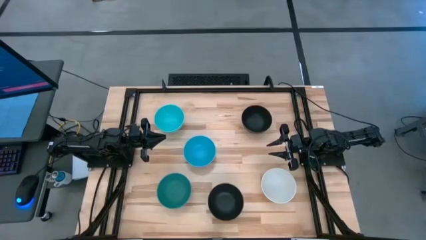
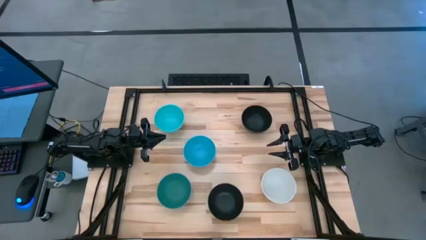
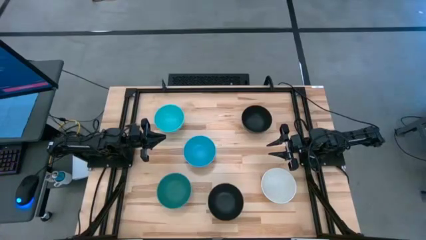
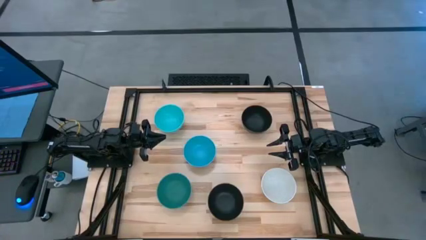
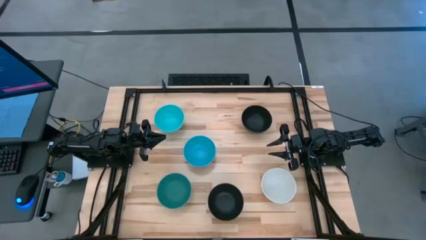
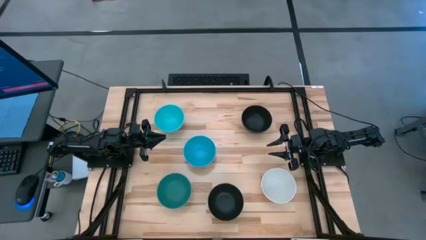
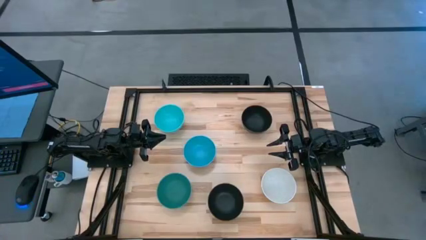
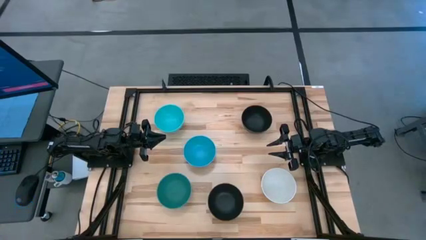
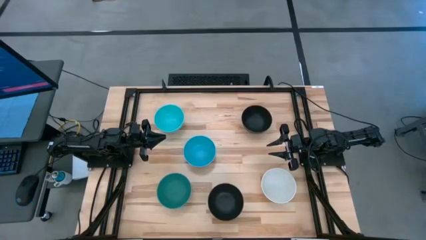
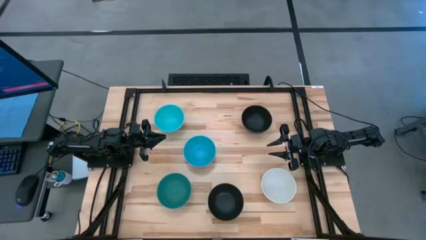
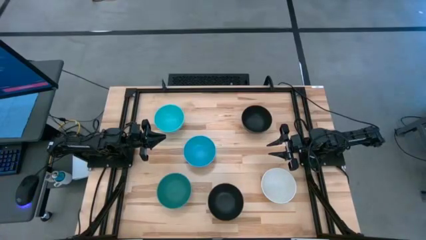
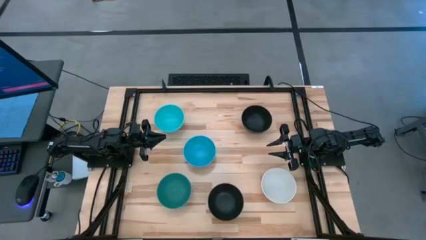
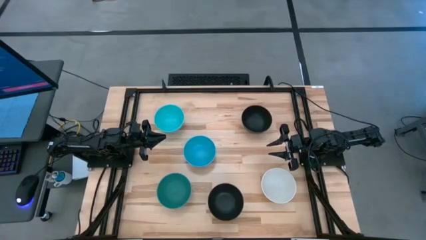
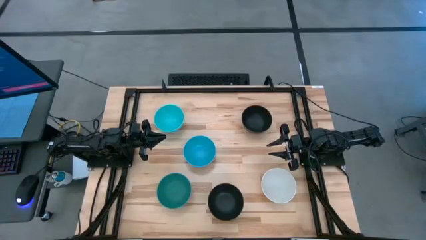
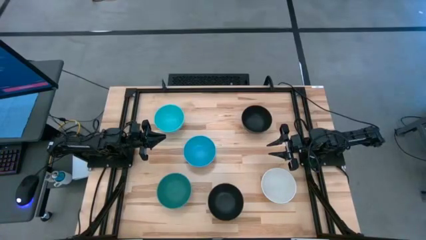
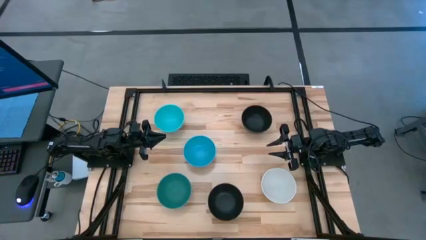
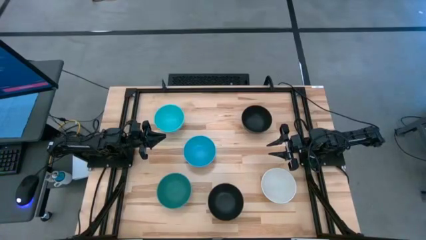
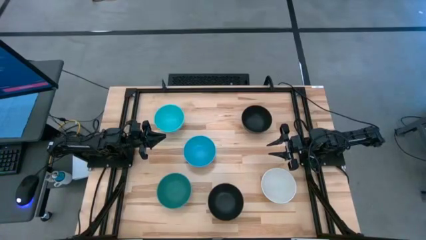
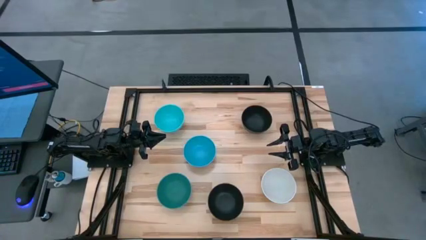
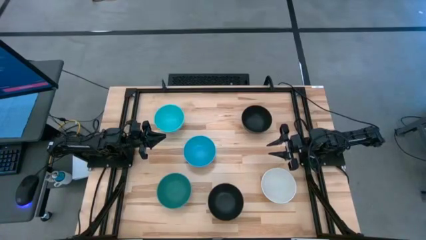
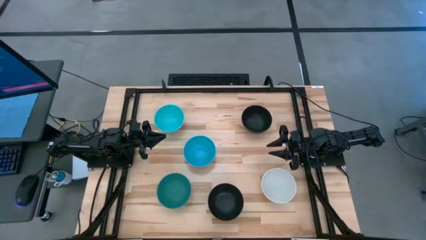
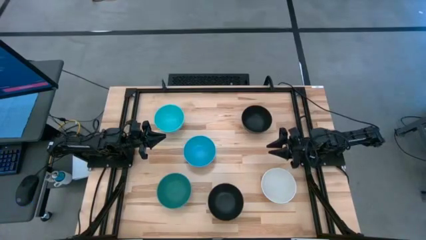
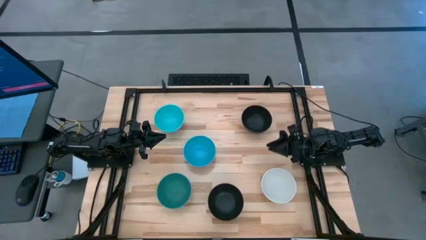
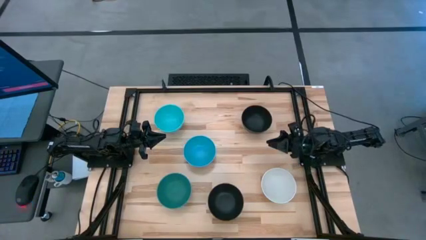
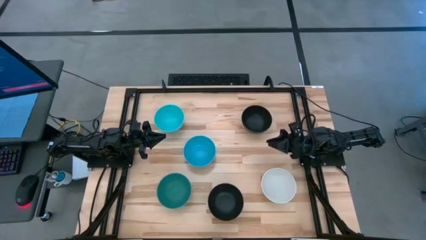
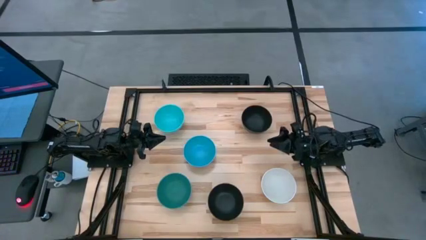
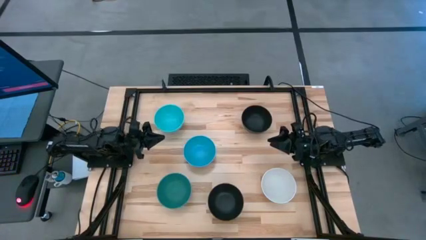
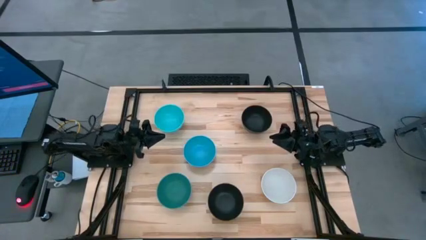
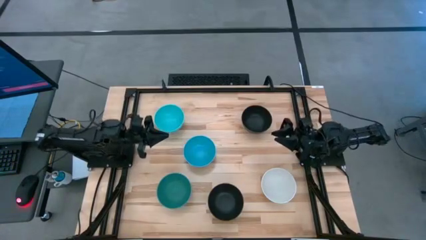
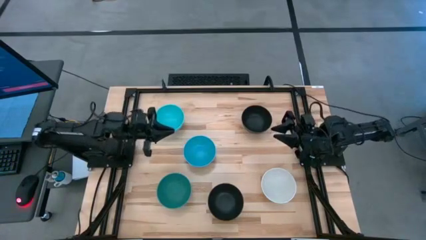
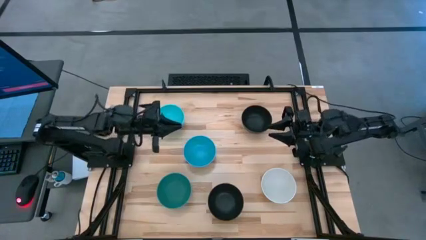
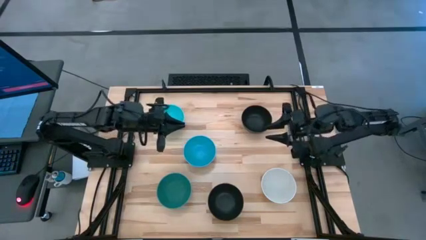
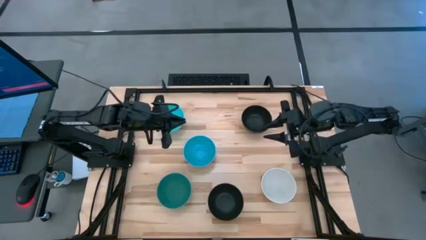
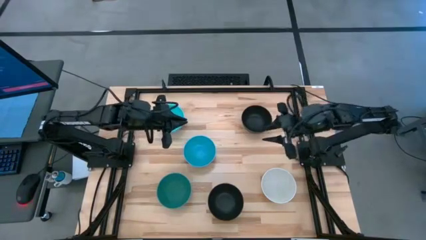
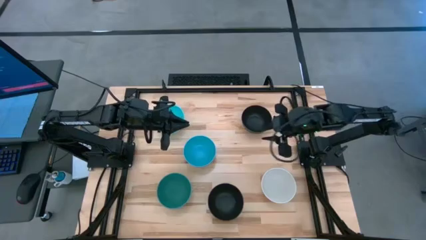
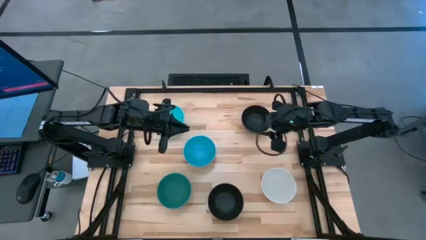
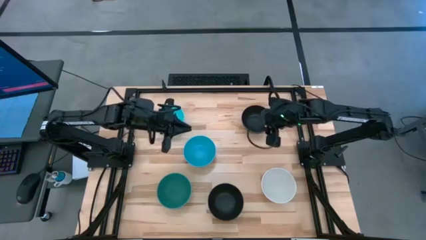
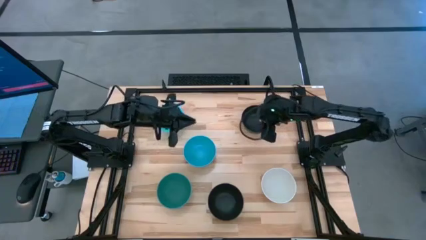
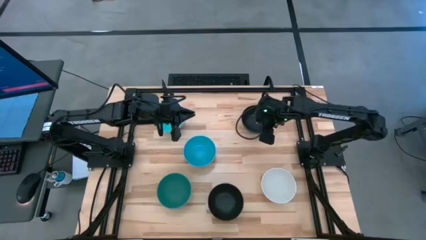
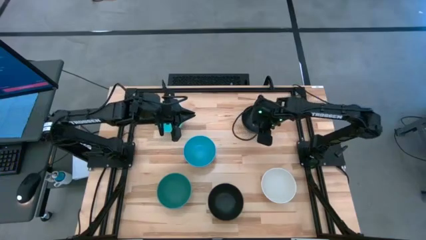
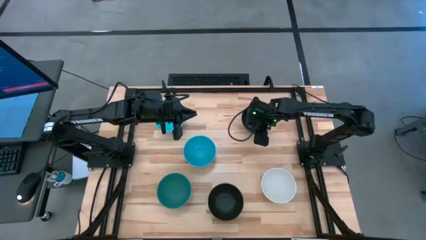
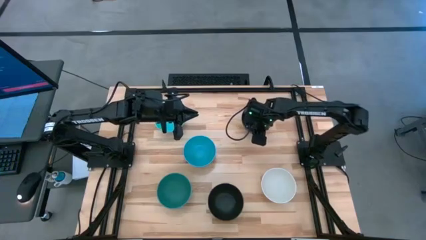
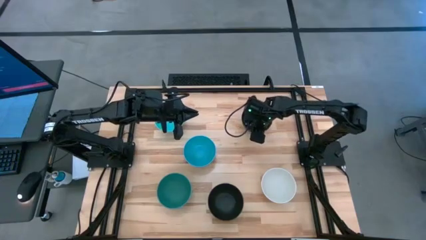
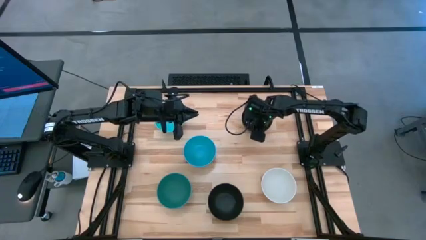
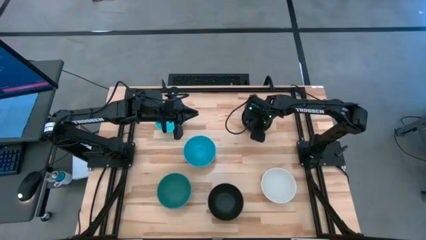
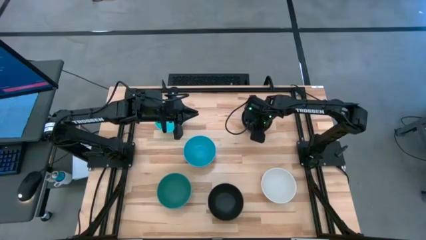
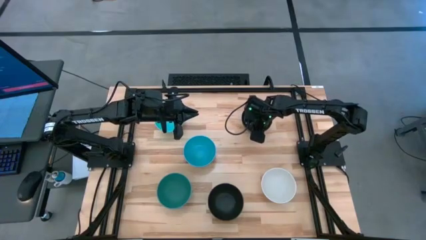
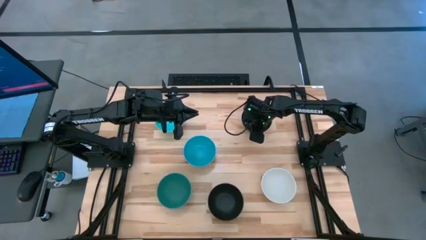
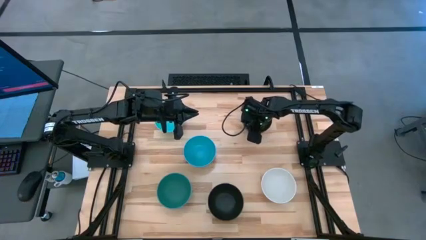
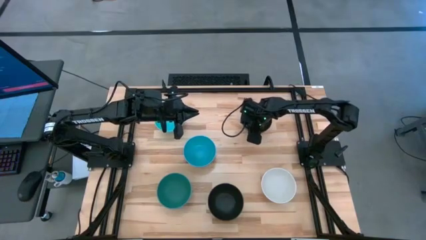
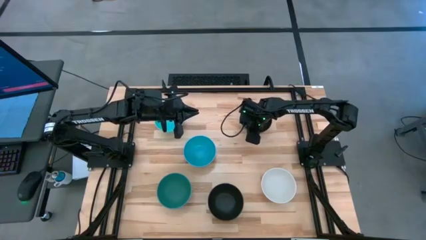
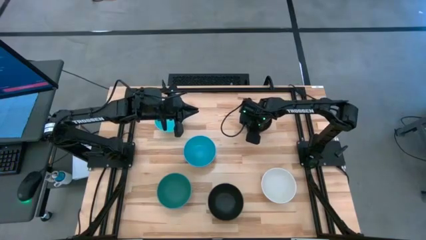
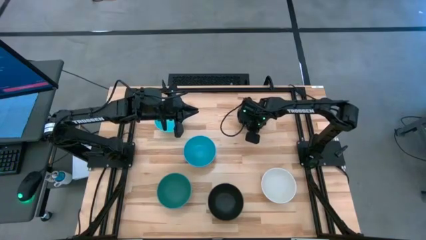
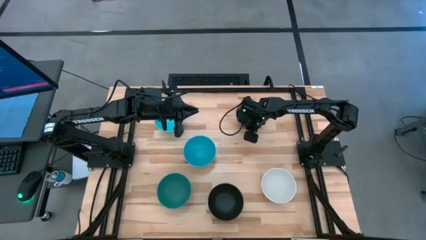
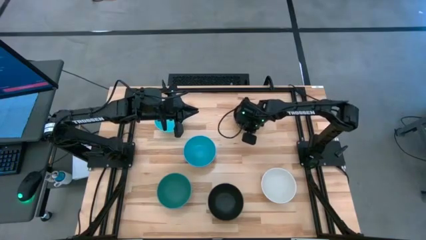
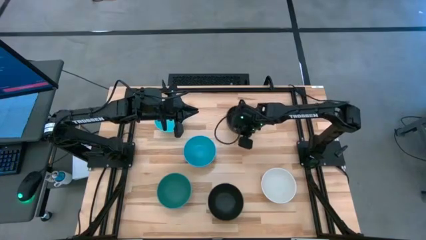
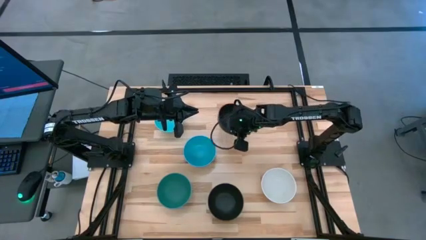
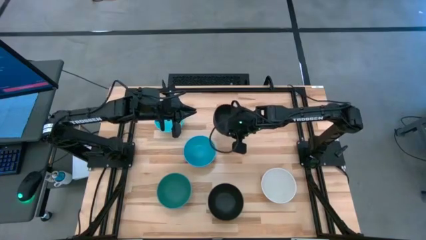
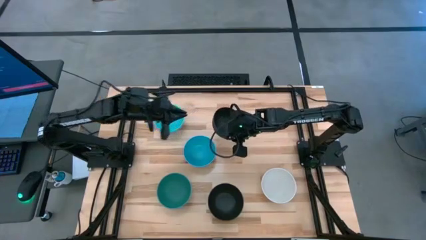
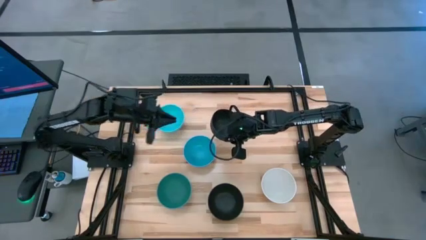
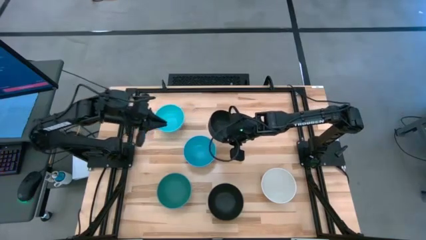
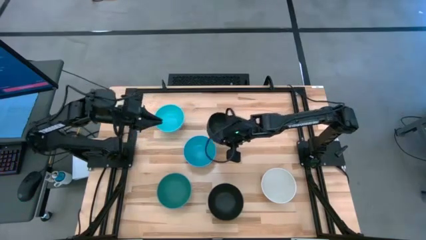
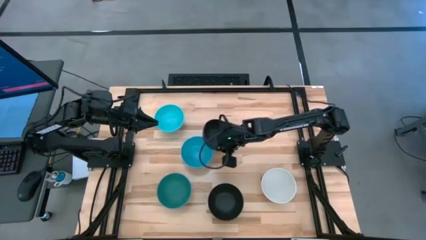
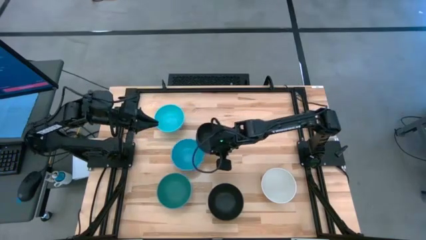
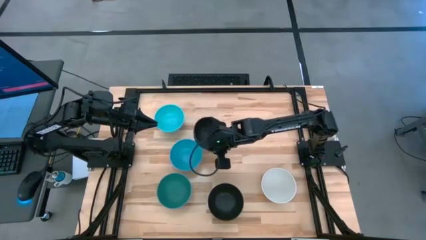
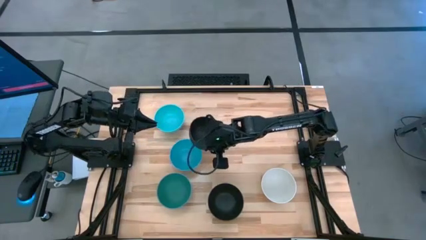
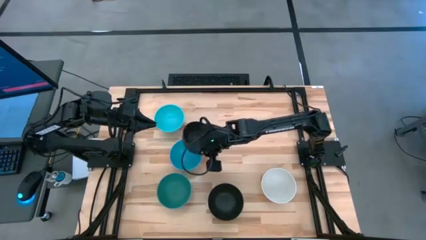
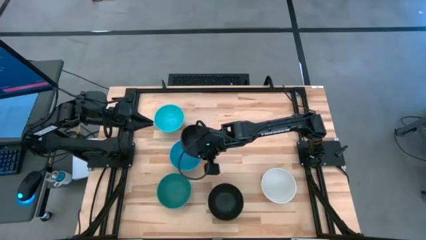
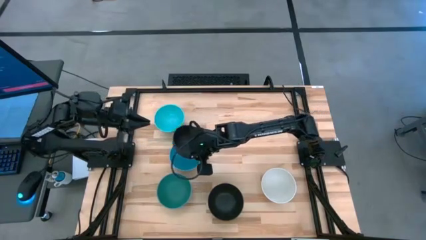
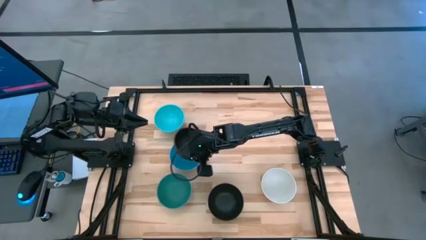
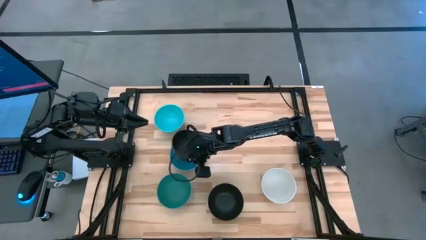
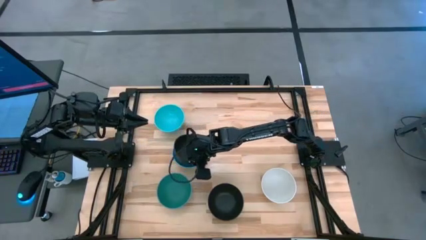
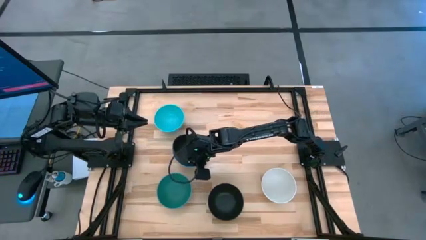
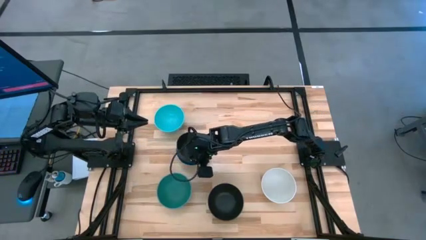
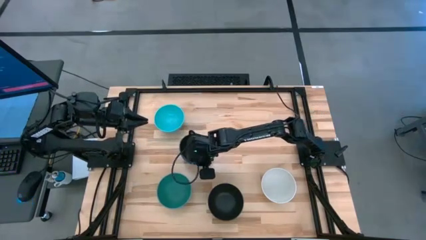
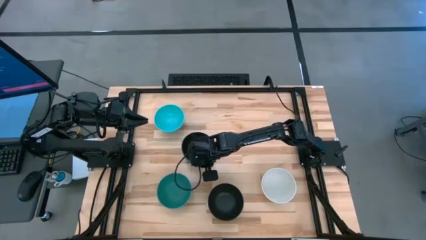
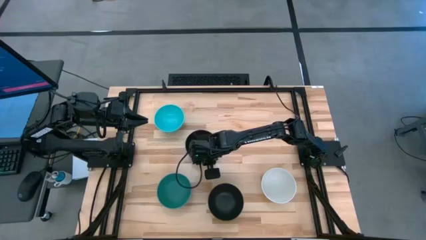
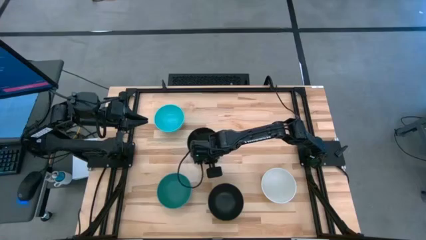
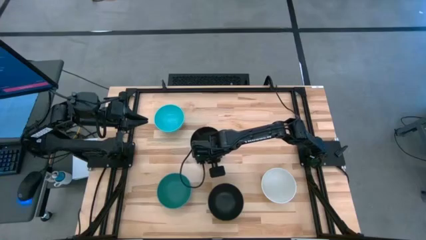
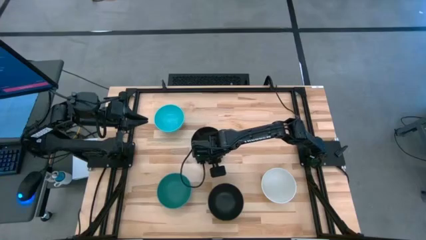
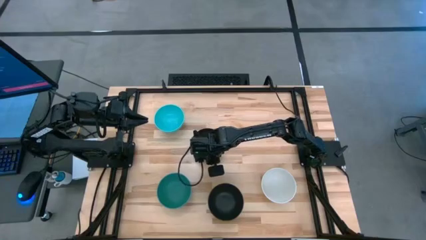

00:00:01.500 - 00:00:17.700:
Task: Nest bowls inside each other
Stack the top black bowl on top of the blue bowl
